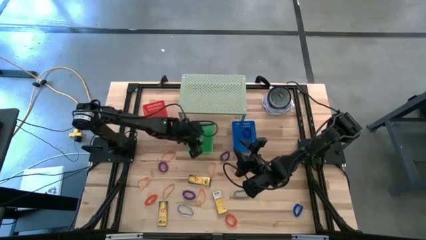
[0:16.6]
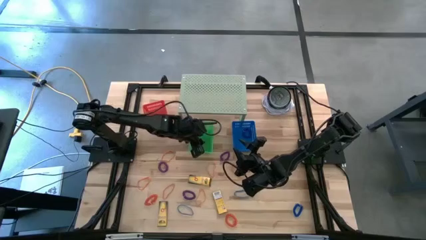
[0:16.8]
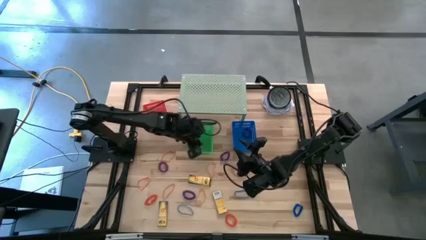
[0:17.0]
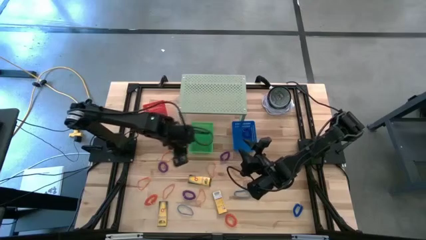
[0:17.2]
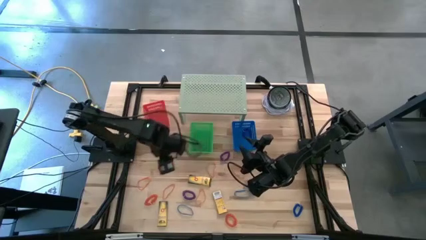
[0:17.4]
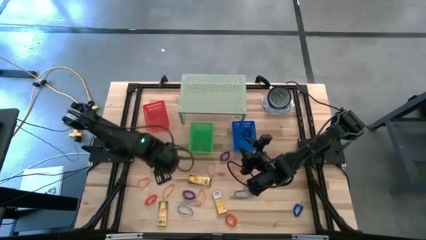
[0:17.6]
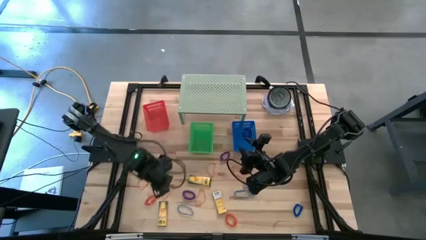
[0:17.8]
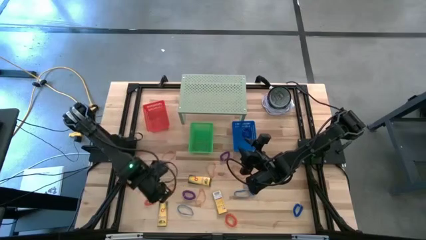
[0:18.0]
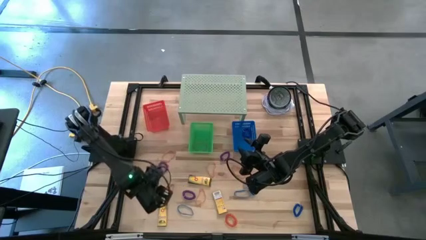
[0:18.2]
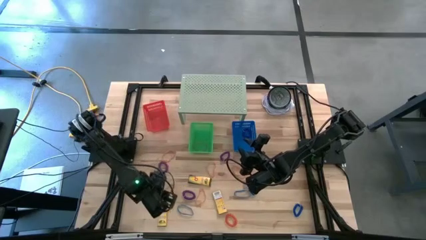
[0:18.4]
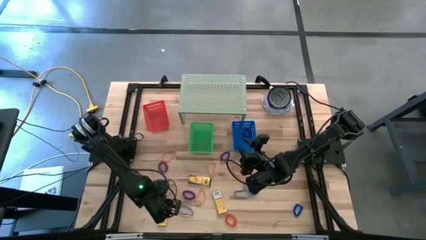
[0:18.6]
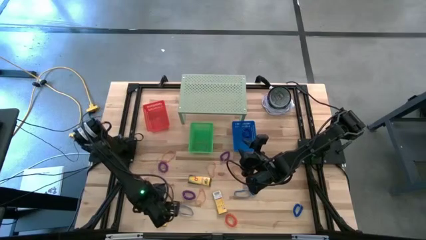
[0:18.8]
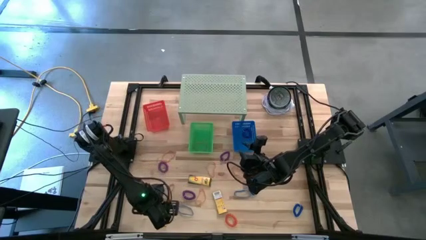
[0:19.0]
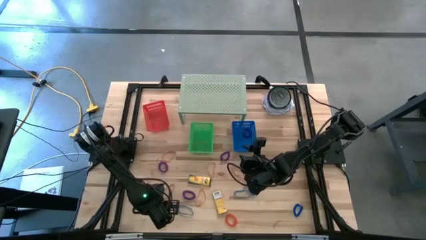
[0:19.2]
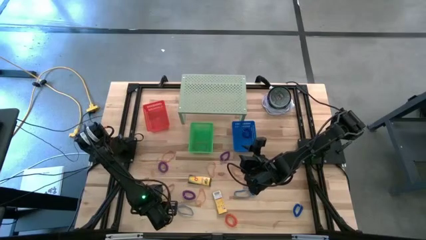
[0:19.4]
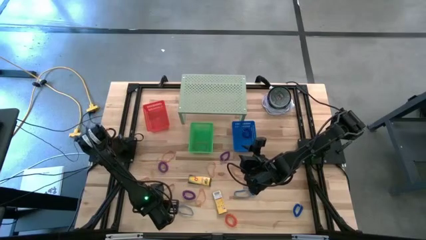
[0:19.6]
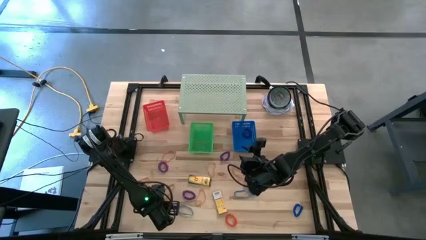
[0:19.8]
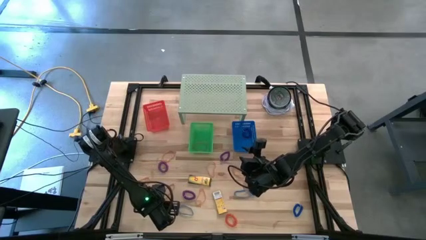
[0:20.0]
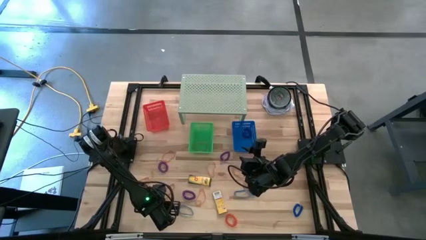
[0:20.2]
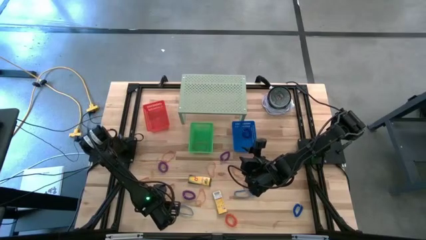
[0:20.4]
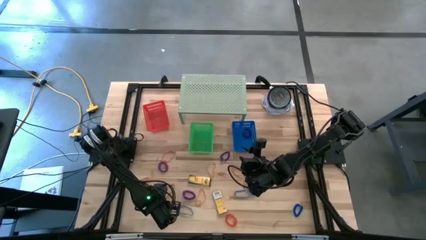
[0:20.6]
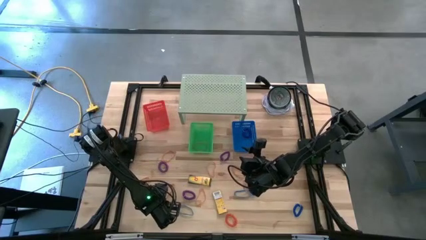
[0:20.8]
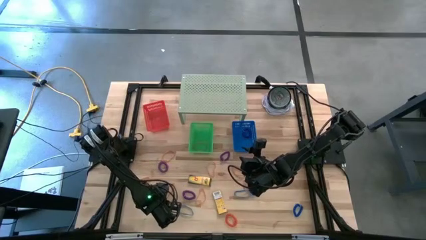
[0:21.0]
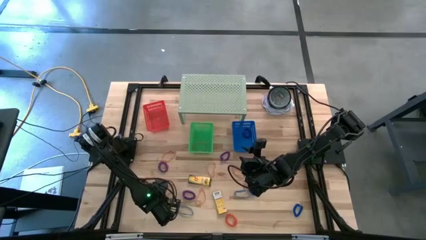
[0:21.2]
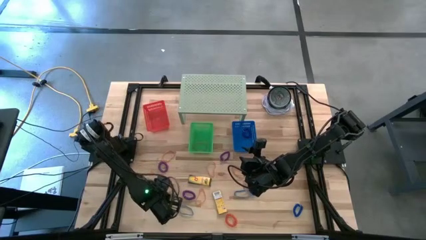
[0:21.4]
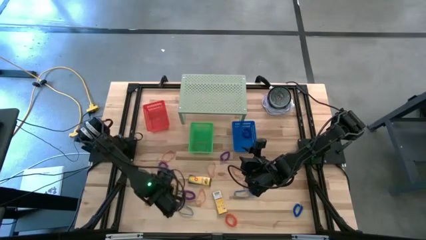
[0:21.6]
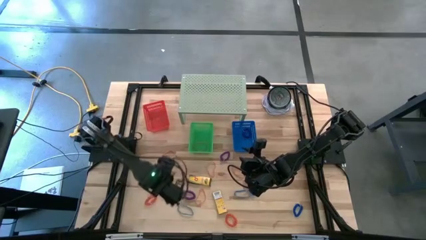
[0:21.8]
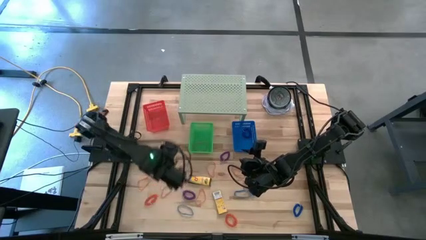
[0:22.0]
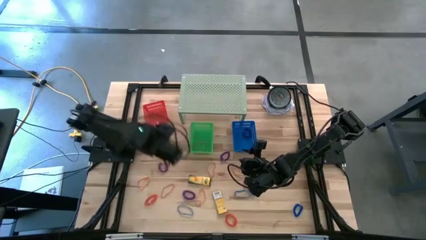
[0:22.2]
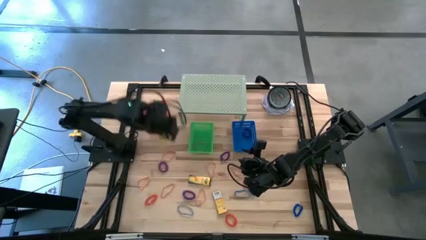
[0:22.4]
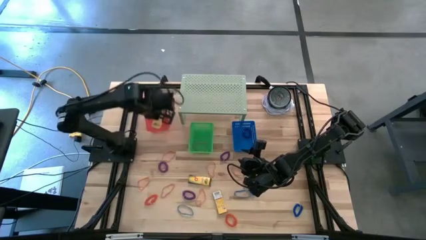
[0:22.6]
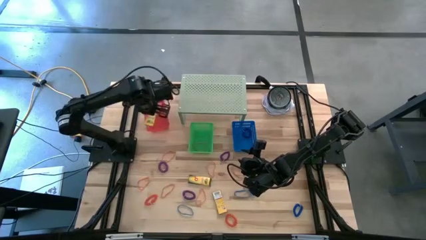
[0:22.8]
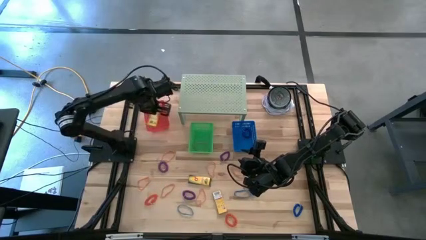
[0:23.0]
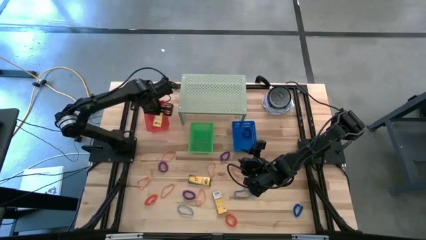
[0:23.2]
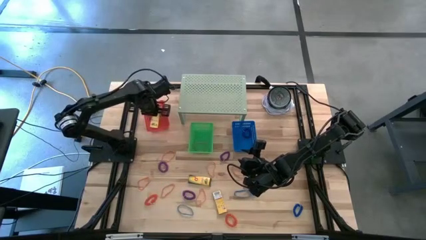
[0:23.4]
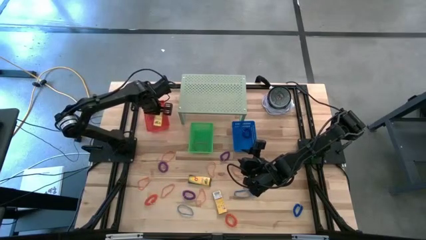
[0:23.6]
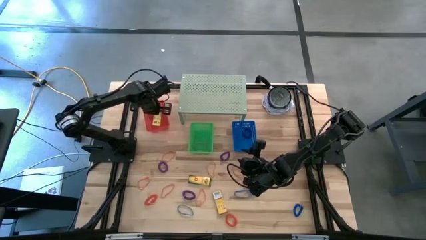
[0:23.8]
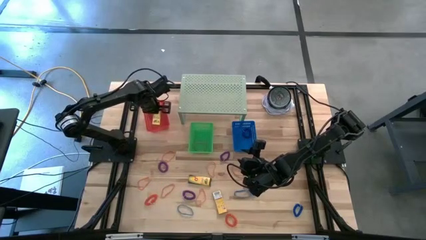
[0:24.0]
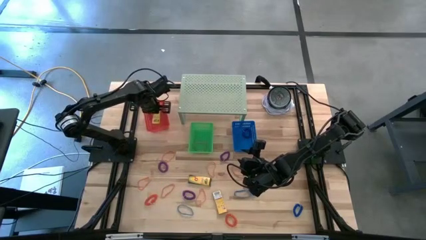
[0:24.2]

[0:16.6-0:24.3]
Task: Pick & Place Office Desk Supplies
Put the yellow crayon box into the red bin

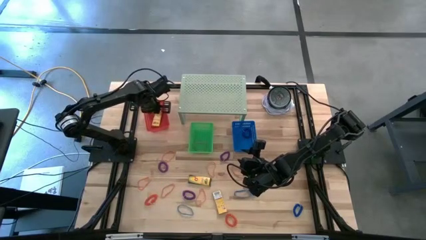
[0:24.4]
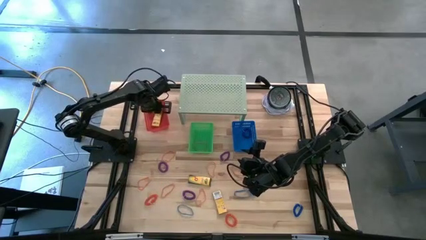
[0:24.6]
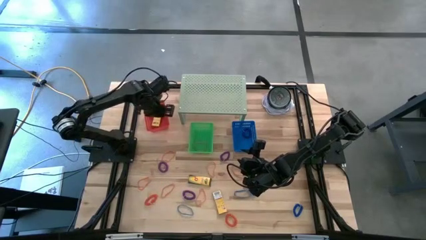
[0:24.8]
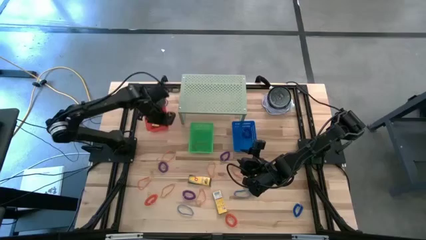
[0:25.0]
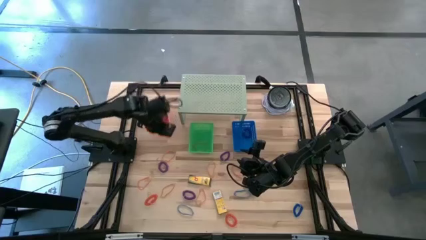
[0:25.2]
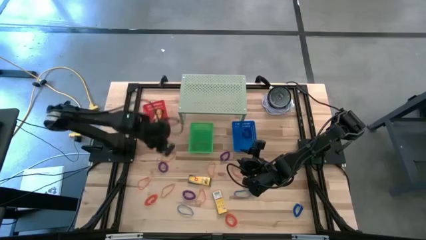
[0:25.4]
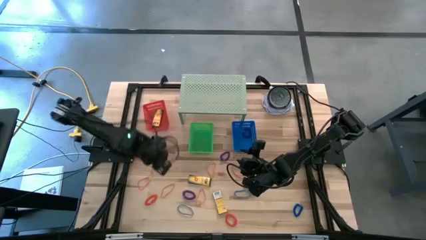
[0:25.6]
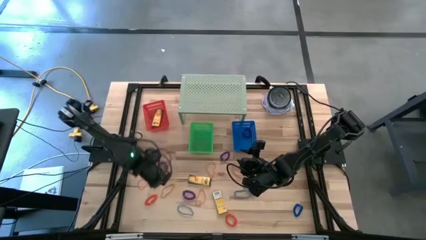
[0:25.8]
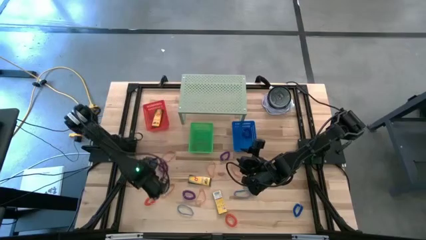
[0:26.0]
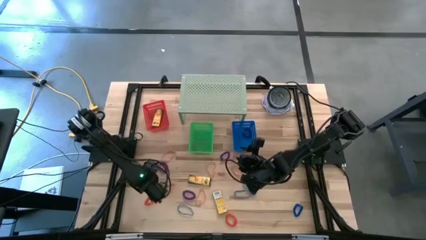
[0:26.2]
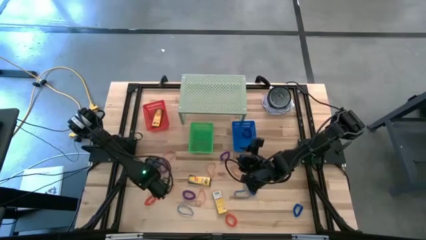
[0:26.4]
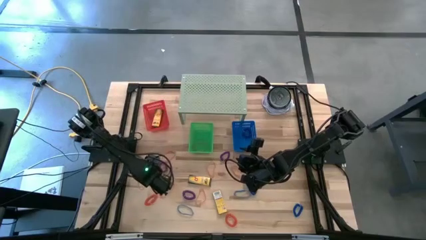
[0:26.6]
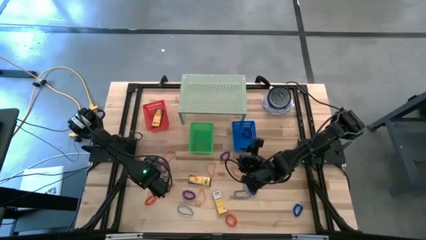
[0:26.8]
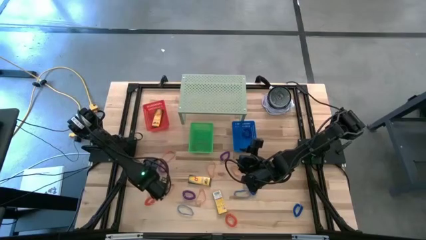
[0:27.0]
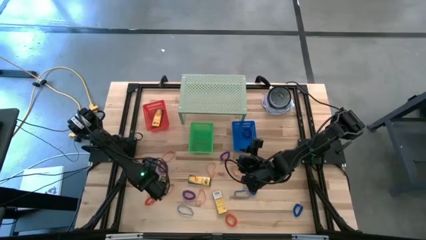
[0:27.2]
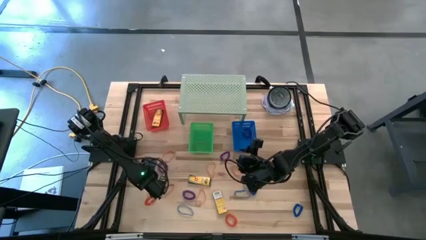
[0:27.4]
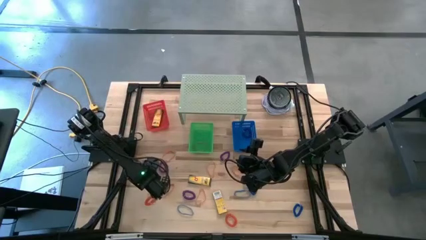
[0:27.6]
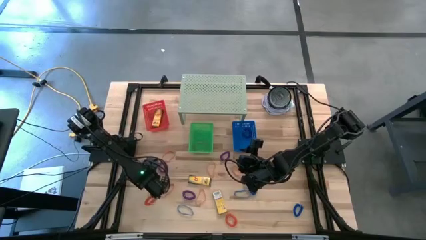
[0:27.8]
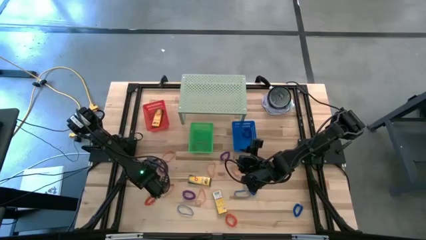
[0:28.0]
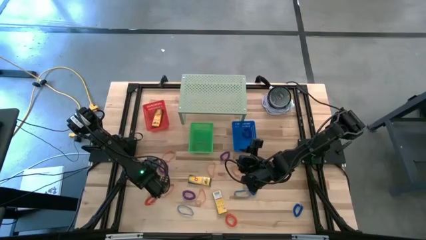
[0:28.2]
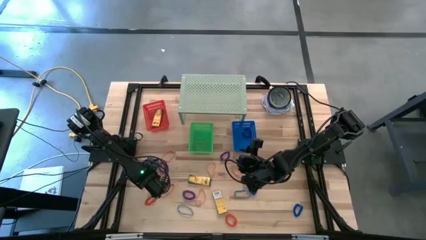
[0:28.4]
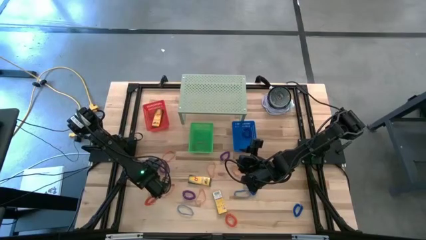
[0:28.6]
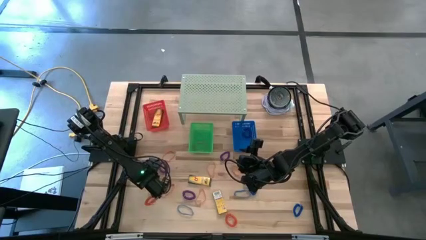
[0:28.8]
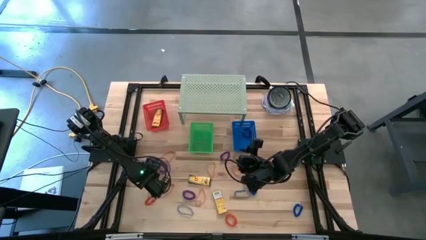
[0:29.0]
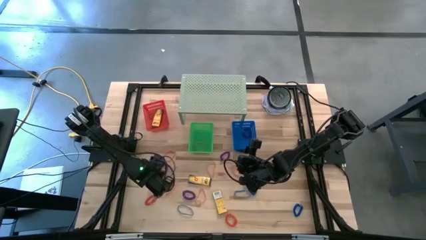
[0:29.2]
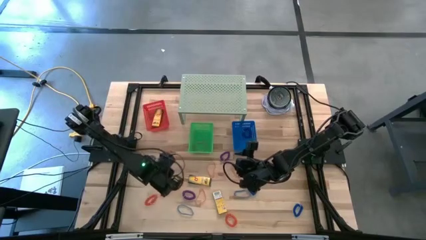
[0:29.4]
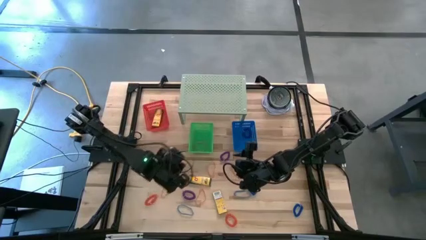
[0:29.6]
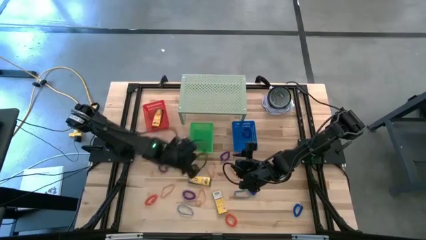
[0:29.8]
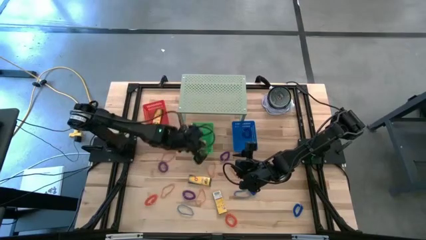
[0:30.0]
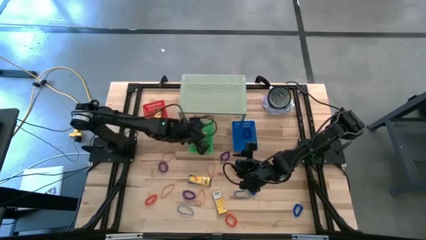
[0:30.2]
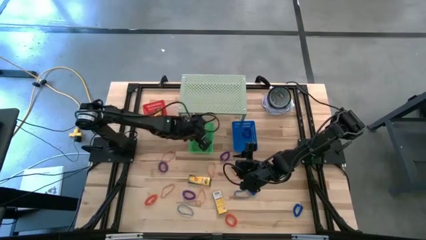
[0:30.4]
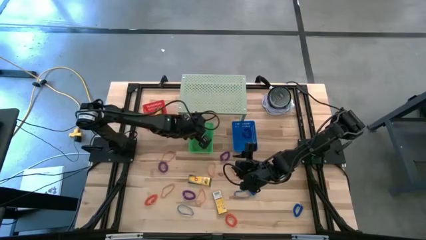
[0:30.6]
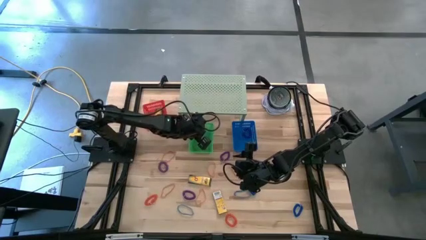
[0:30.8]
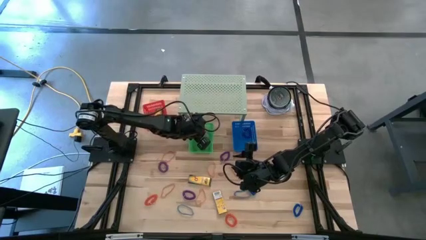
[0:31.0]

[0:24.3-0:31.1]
Put the orange rubber band into the green bin
